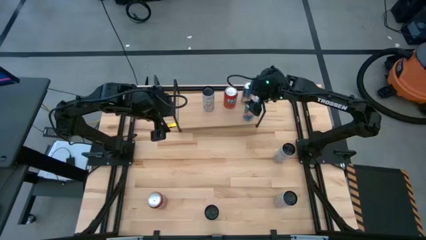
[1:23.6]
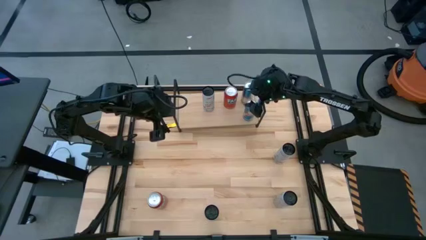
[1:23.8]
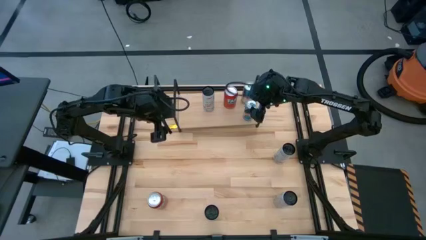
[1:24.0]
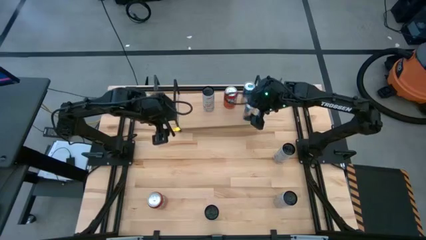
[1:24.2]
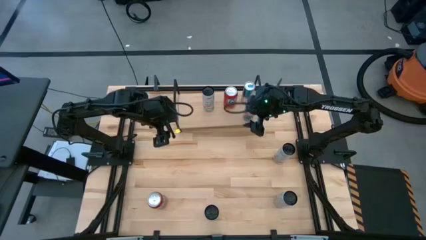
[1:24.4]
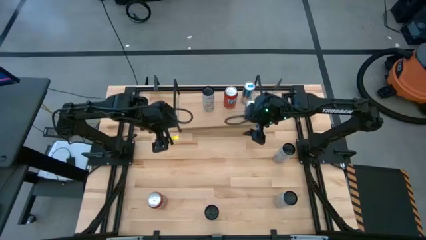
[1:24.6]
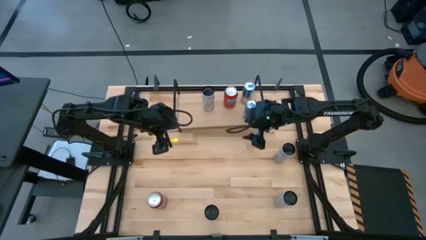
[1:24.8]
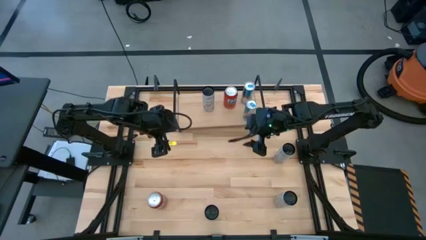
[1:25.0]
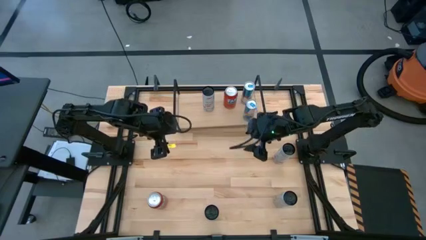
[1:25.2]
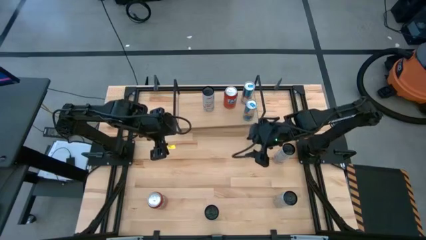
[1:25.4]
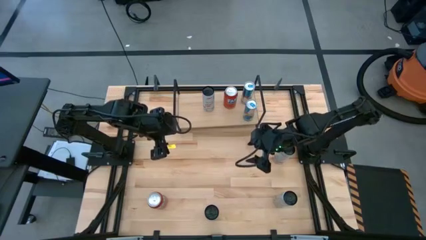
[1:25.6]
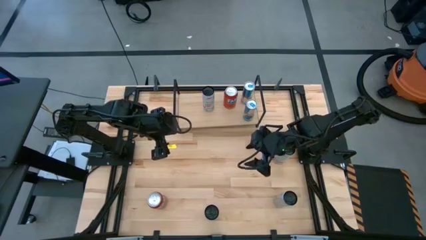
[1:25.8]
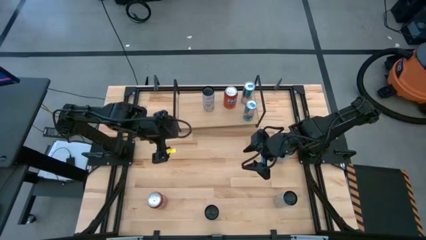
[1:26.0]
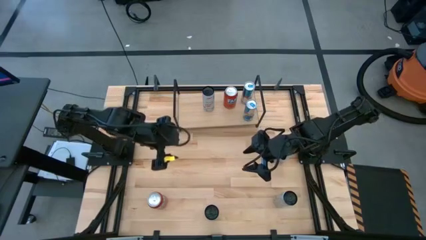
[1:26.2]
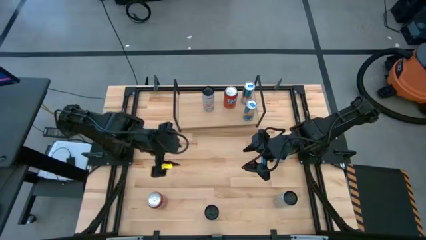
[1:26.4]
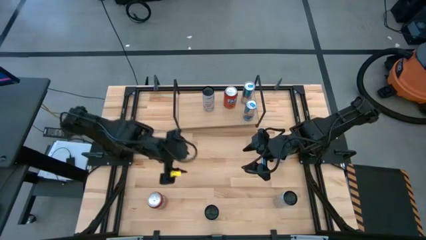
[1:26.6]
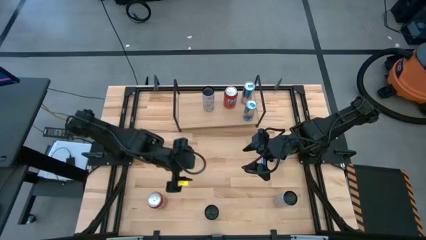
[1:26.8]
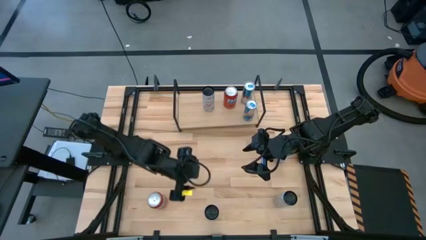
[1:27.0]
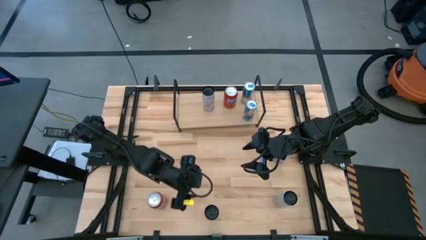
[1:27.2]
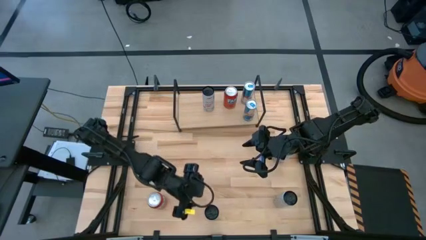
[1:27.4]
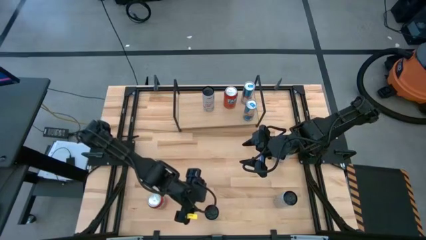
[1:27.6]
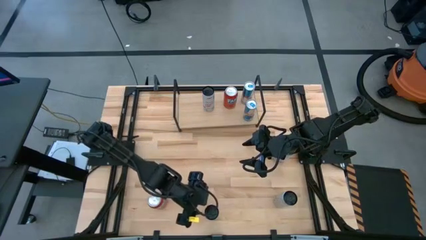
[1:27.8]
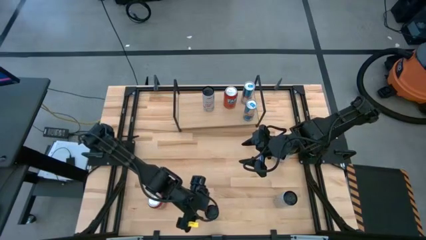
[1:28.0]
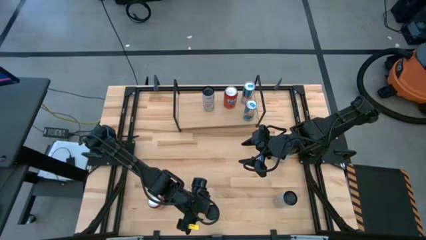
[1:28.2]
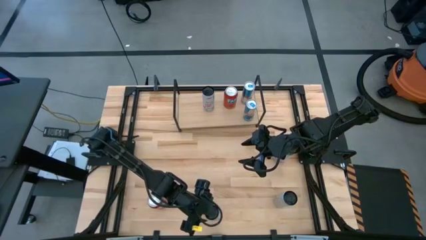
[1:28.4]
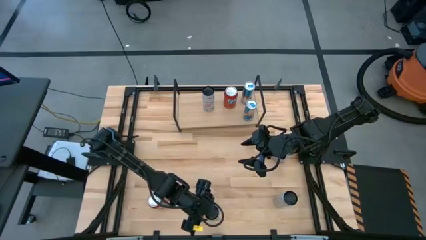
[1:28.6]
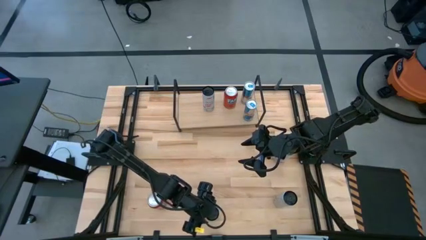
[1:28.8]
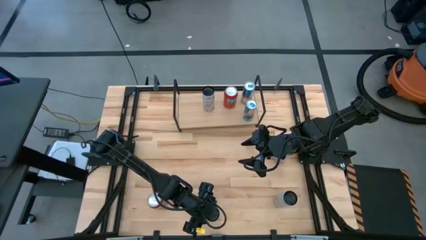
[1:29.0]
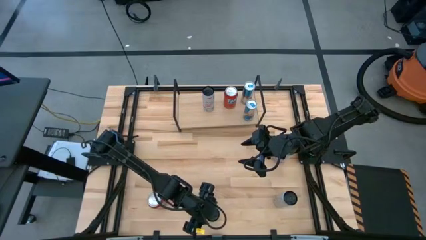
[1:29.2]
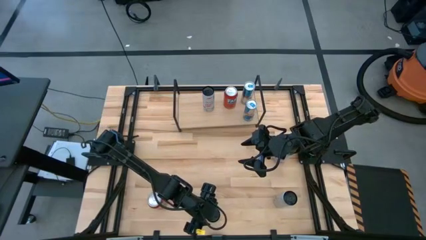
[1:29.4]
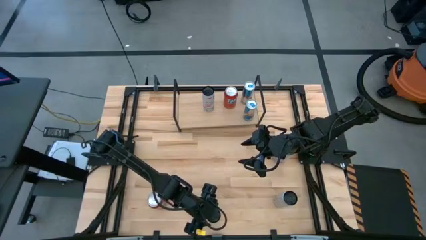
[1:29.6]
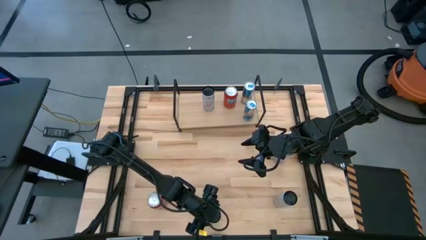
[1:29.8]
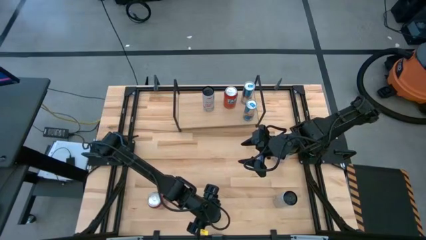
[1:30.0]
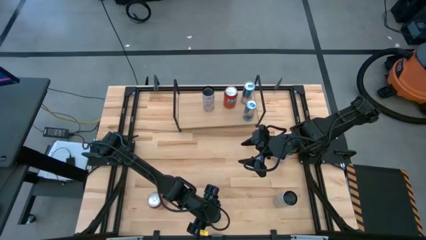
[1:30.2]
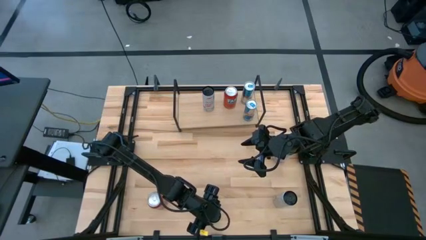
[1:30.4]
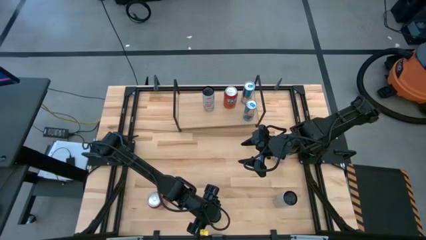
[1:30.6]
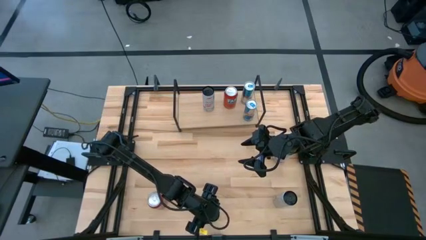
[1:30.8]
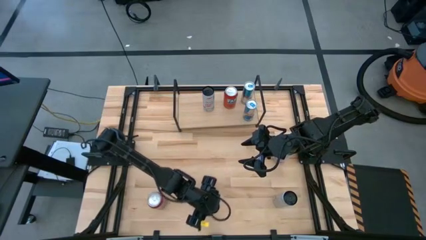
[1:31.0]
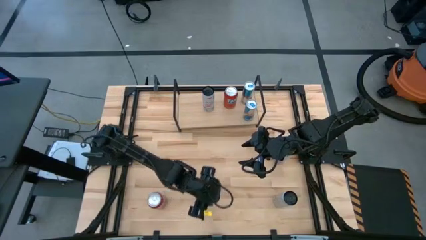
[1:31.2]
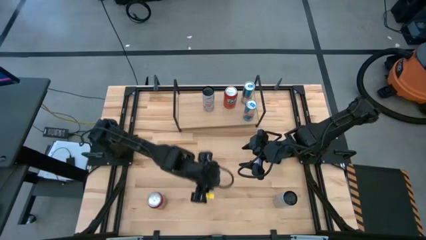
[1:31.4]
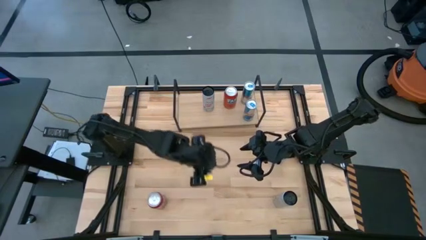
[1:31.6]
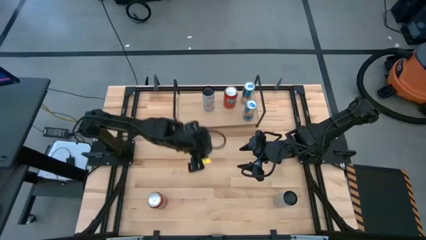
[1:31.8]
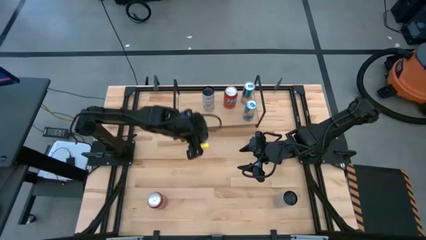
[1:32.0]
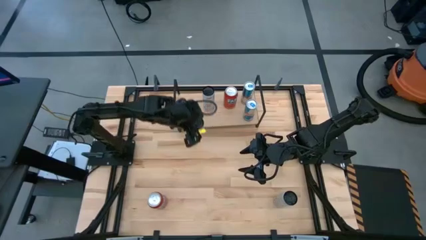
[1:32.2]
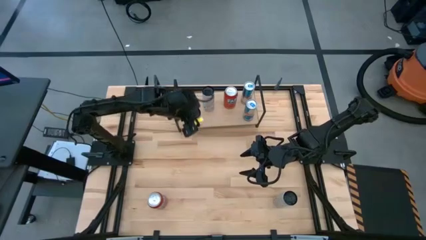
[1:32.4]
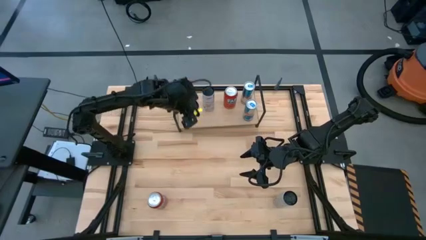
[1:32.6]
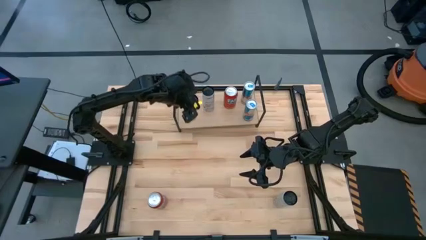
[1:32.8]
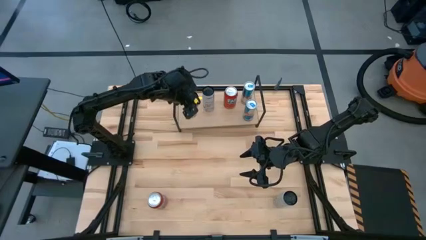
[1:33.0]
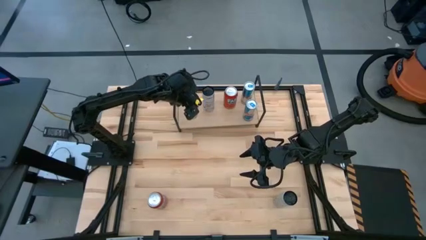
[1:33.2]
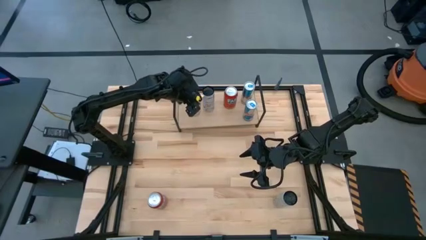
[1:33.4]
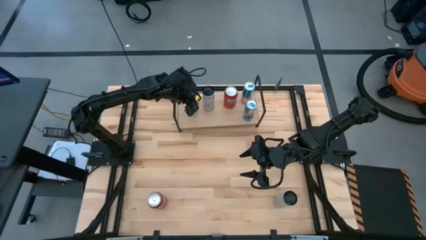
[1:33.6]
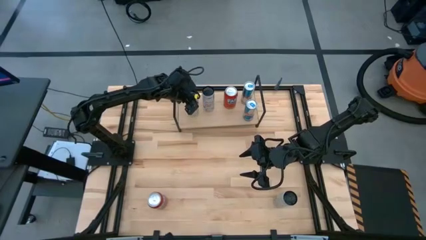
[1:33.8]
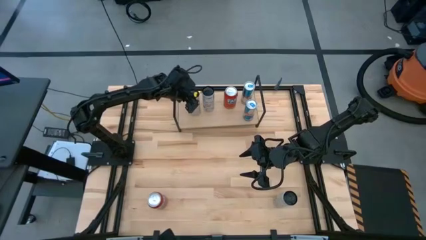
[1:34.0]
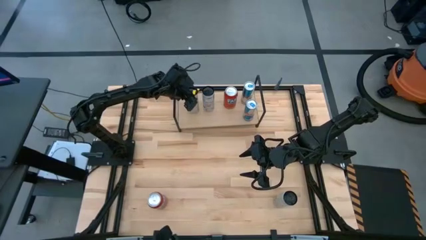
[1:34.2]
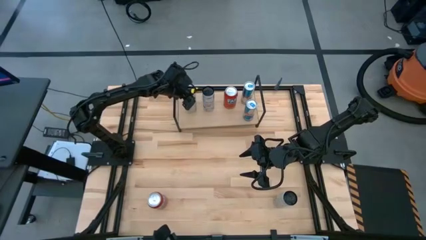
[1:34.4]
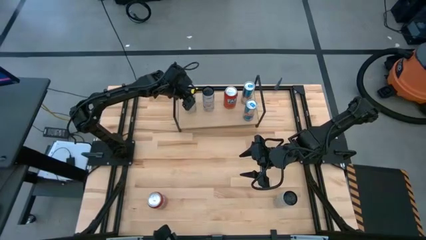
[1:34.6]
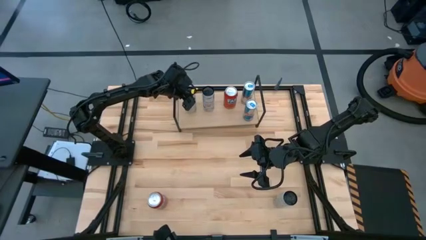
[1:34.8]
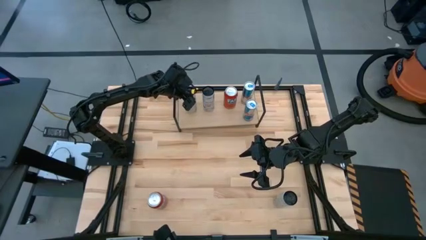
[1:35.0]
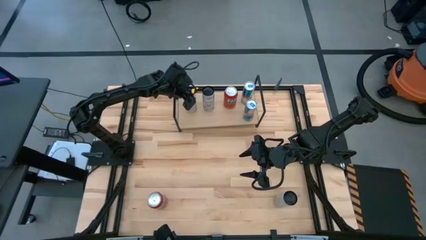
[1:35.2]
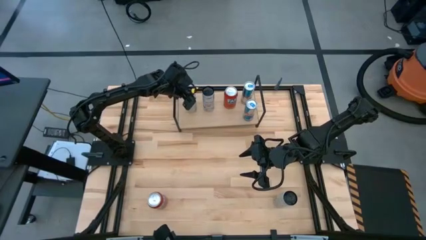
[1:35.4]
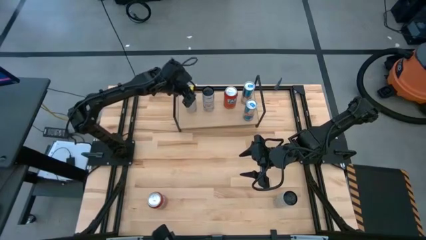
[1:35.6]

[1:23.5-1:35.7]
Task: Place canned beverage on shelf
Put the left white and pink soda can on the shelf

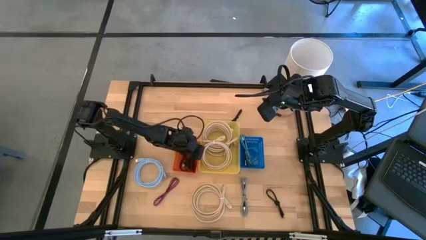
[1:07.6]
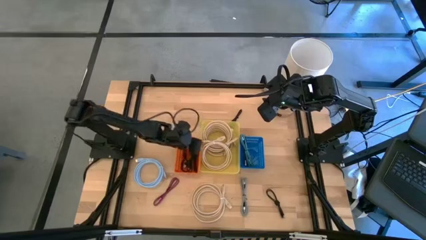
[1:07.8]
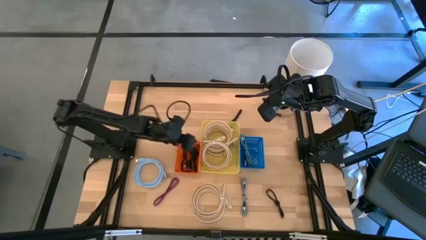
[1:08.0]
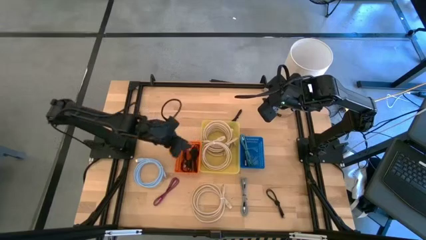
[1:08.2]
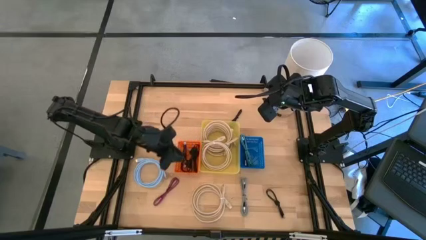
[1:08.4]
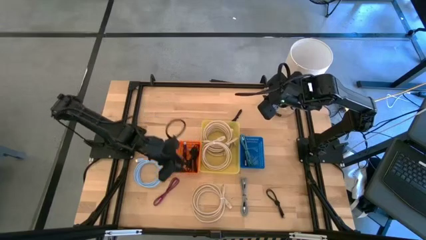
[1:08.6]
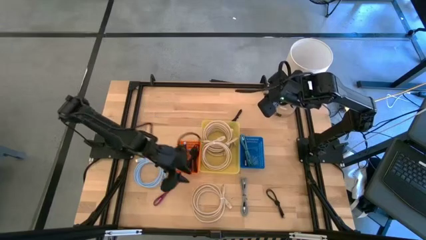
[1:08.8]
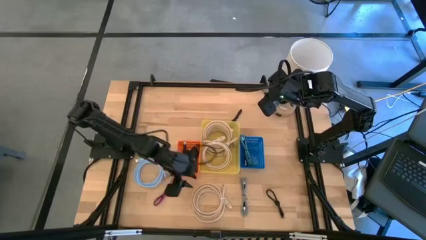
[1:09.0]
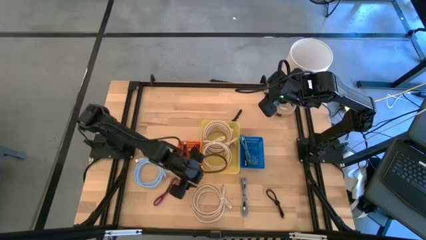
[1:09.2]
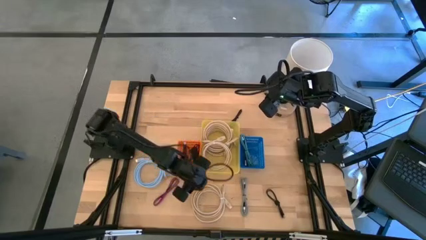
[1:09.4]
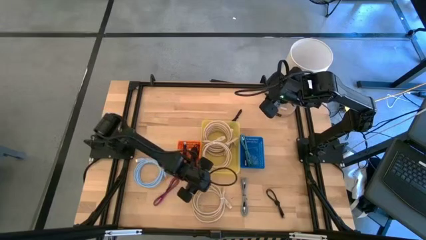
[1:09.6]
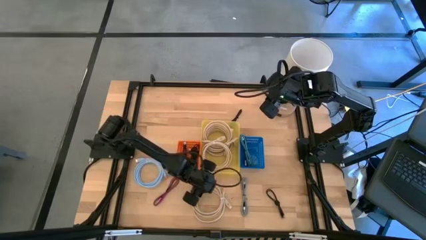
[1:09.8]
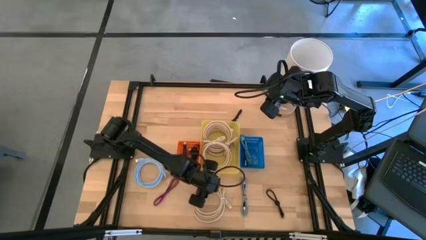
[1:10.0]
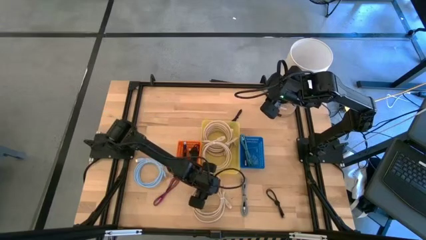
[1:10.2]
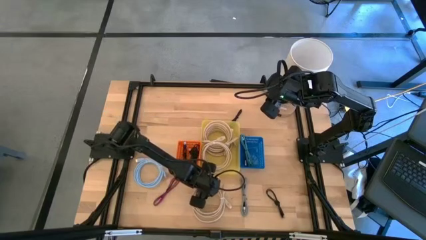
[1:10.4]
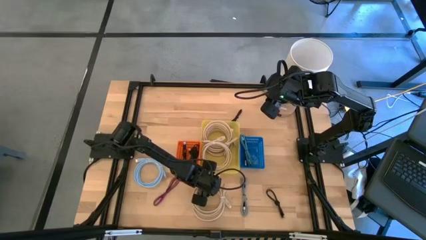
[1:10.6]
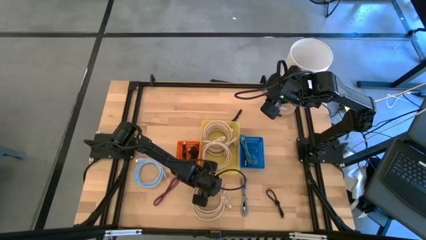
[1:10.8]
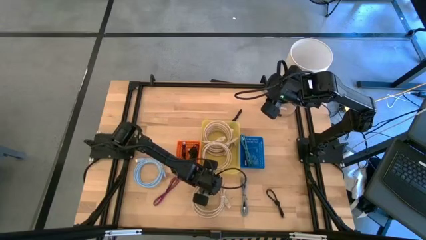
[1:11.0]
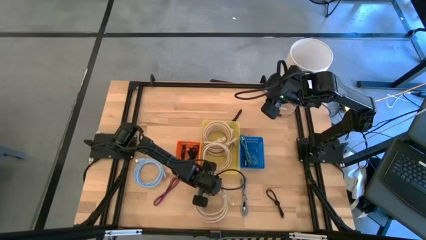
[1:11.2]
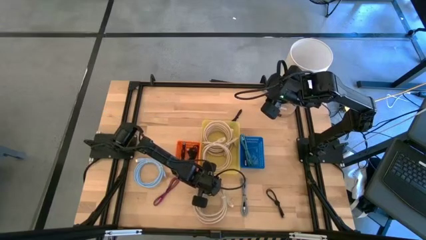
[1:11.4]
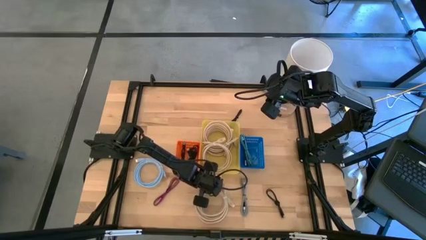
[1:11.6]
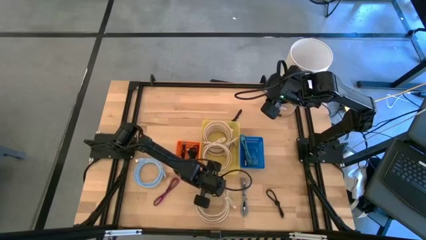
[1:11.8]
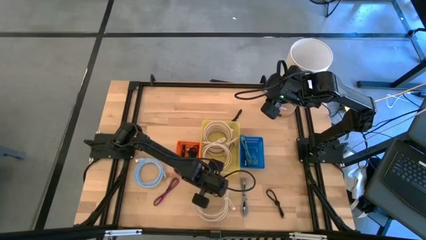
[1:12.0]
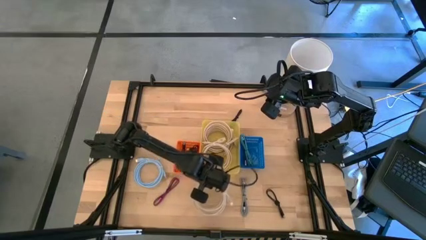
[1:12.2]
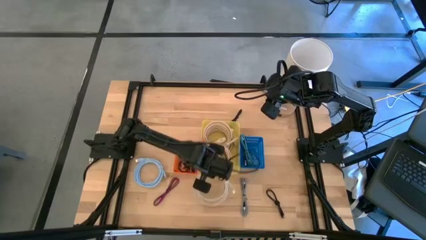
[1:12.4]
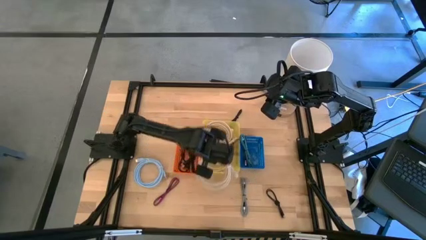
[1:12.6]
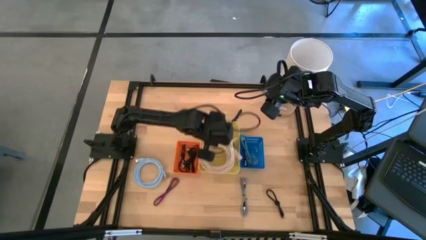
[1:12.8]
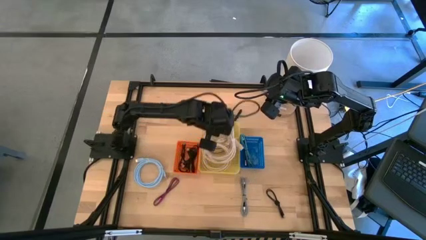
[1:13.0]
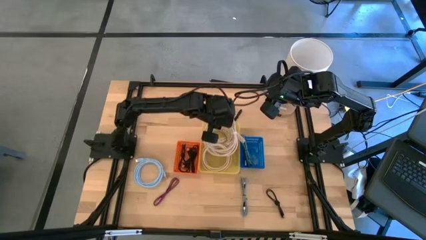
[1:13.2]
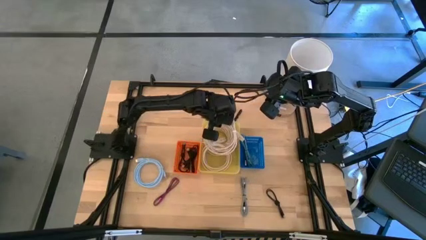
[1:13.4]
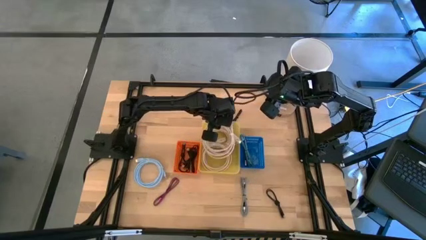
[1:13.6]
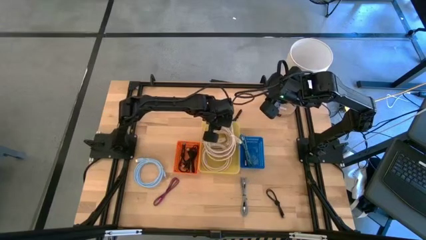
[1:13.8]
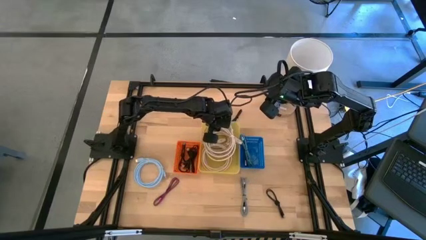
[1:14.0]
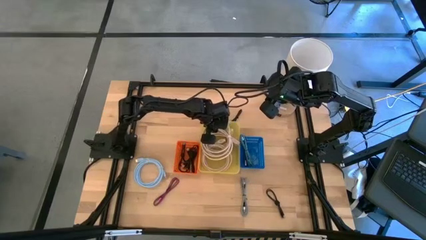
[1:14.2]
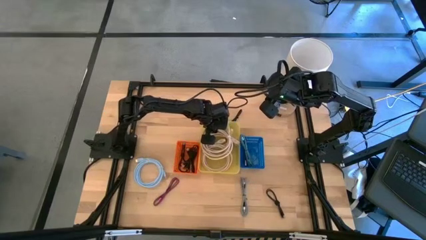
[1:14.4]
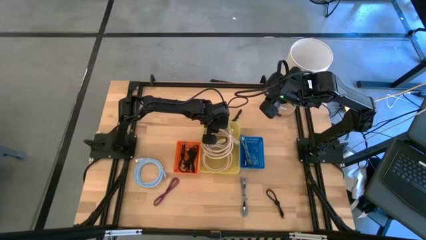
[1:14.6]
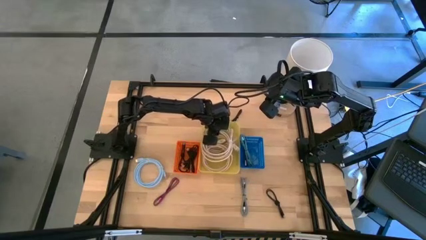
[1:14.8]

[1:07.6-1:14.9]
Task: Pick & Place USB Port
Put the white usb cable into the yellow bin
